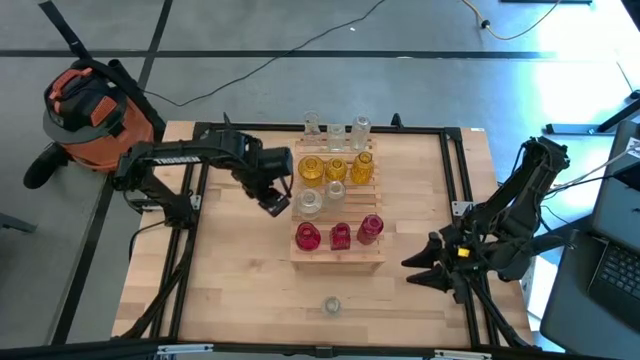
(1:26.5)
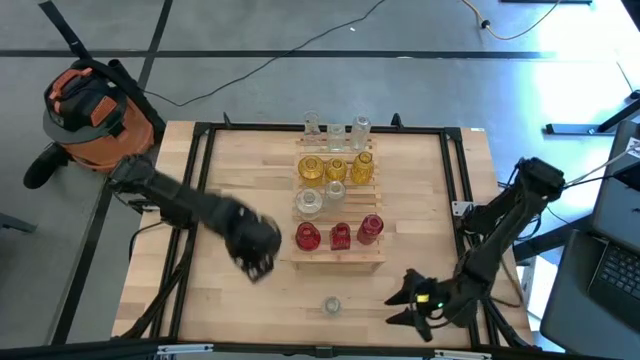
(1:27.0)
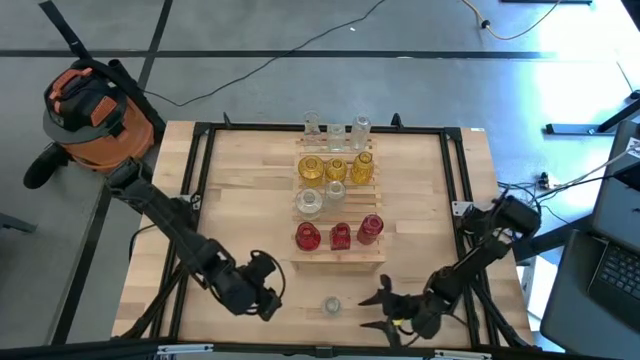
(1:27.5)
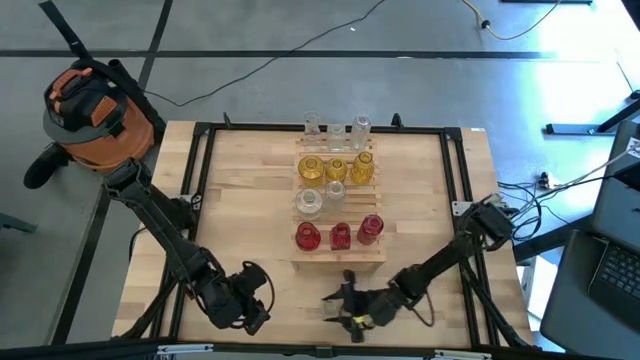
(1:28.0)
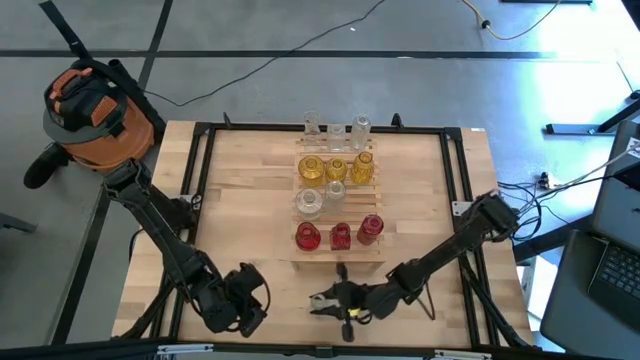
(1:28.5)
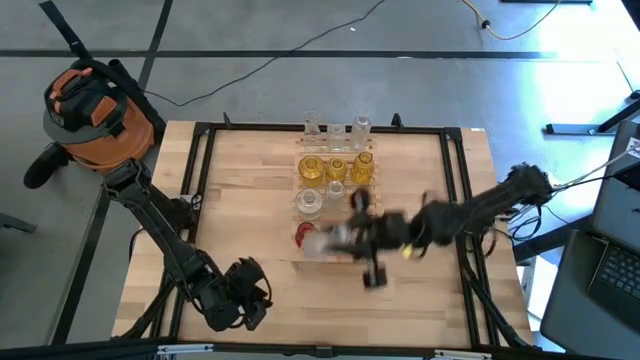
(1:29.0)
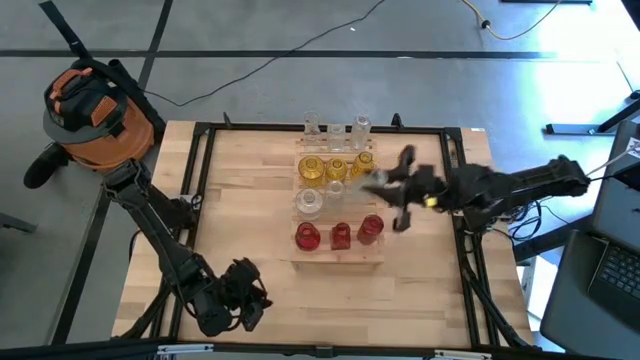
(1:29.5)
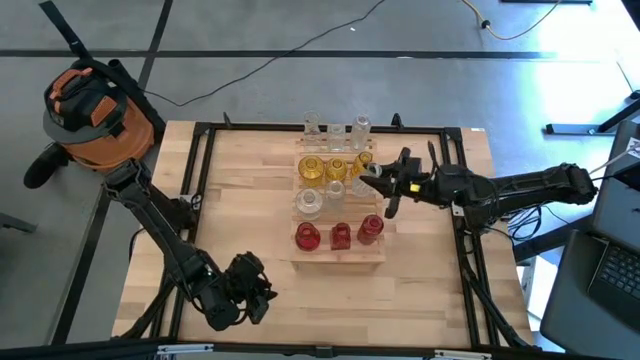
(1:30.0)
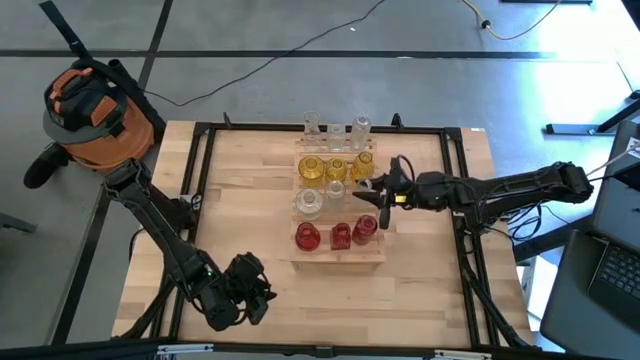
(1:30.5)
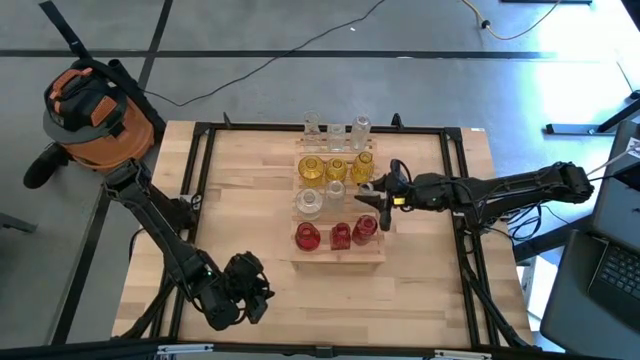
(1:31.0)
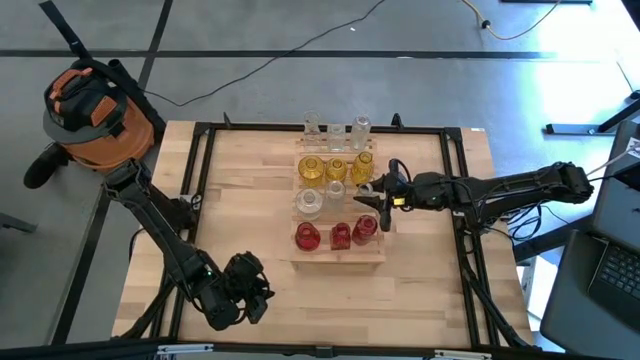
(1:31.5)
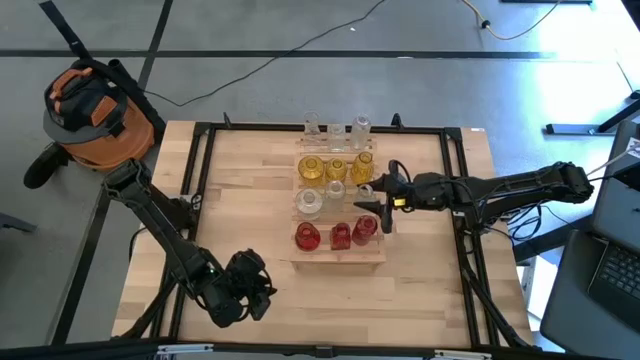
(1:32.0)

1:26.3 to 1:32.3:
Task: sort vases onto shelf
Align the transparent vase with the transparent vases on the shelf

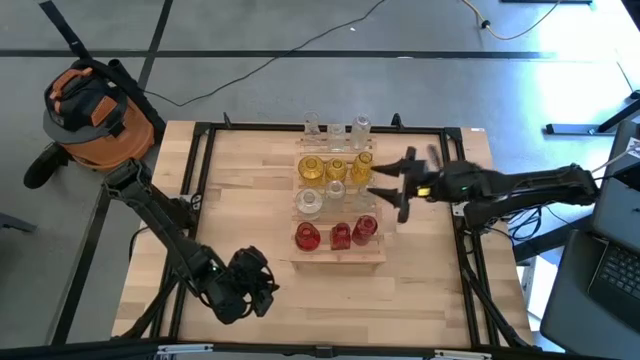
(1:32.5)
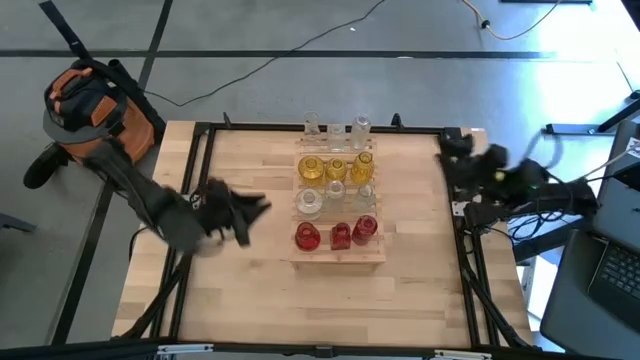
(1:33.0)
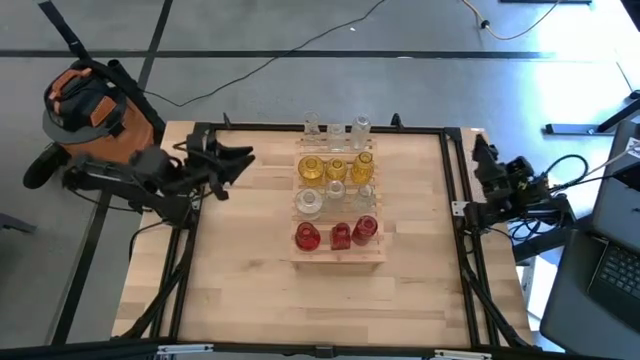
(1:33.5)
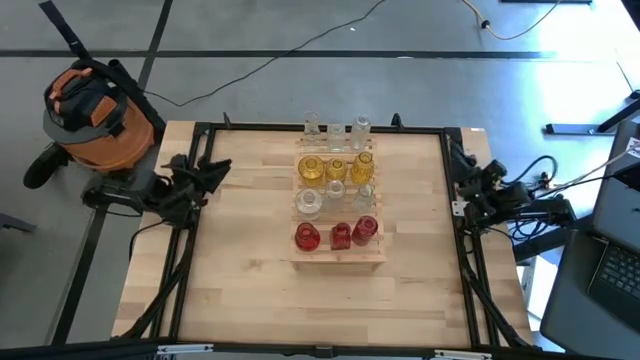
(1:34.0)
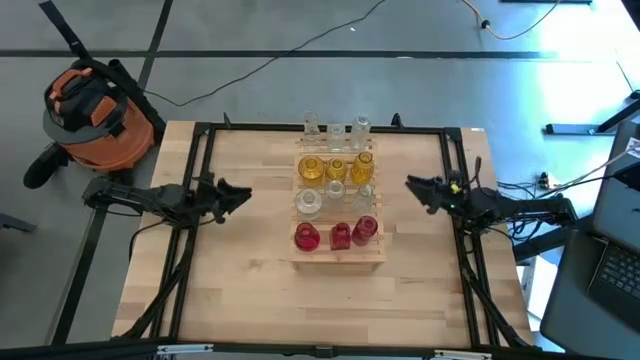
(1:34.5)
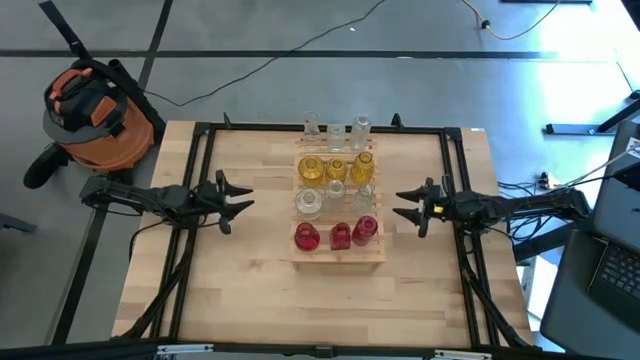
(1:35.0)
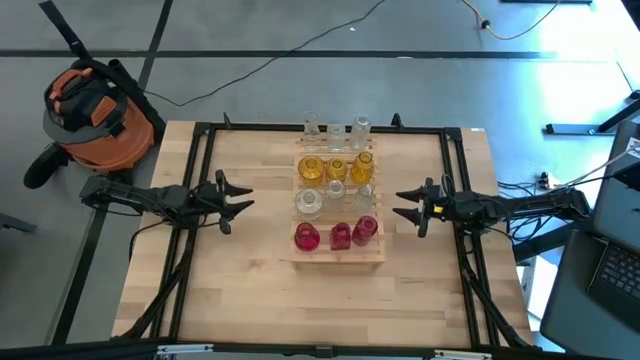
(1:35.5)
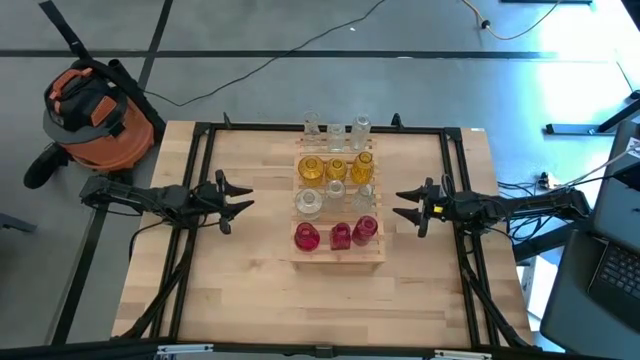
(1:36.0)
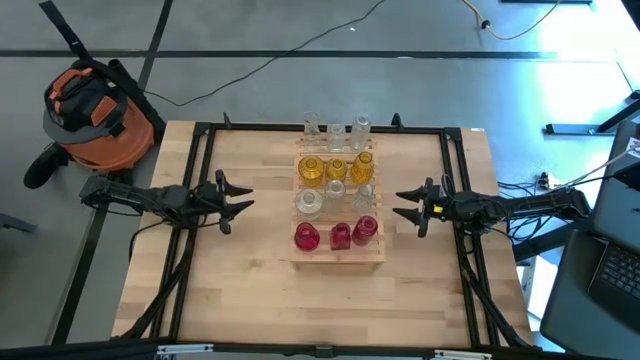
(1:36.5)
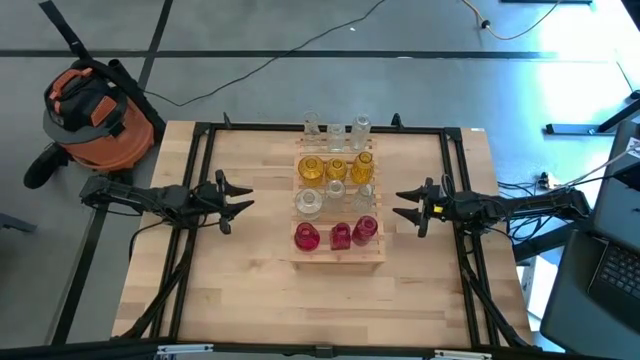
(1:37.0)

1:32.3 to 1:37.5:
Return to Home Position

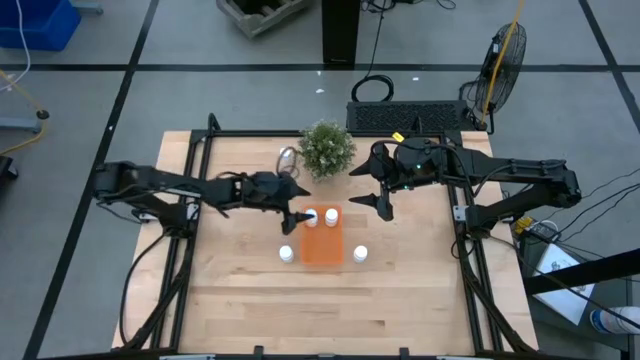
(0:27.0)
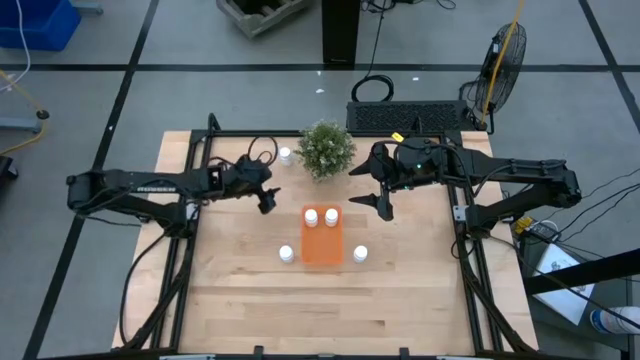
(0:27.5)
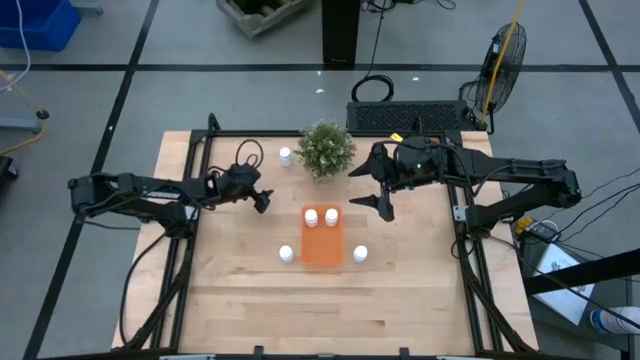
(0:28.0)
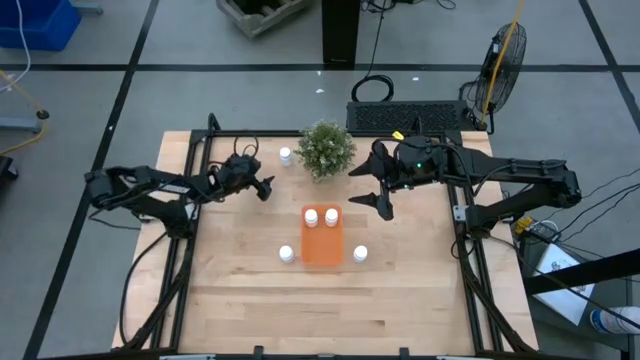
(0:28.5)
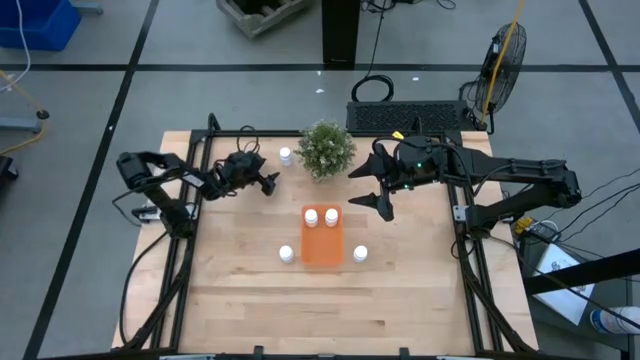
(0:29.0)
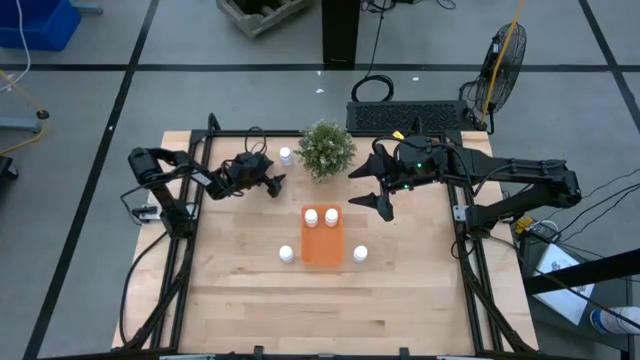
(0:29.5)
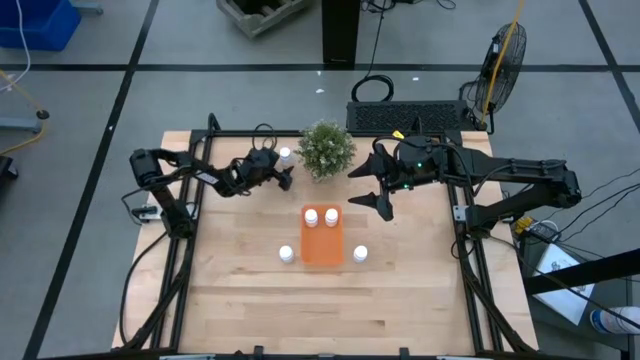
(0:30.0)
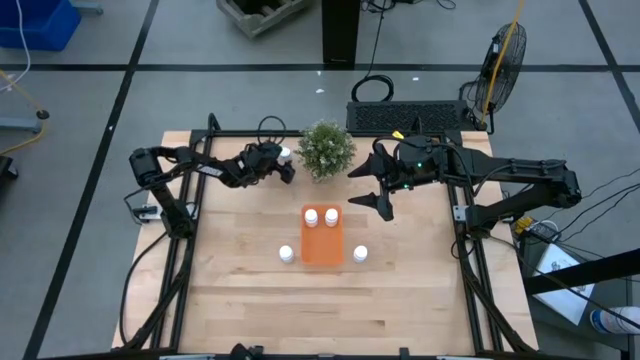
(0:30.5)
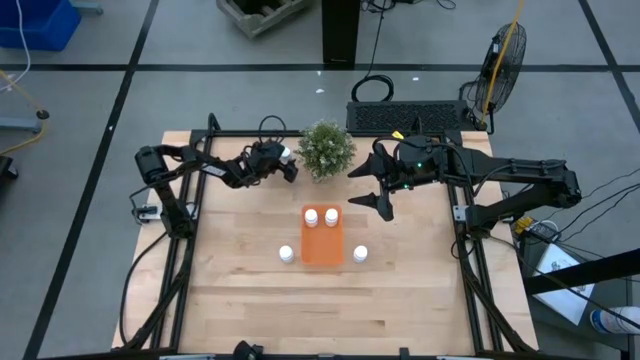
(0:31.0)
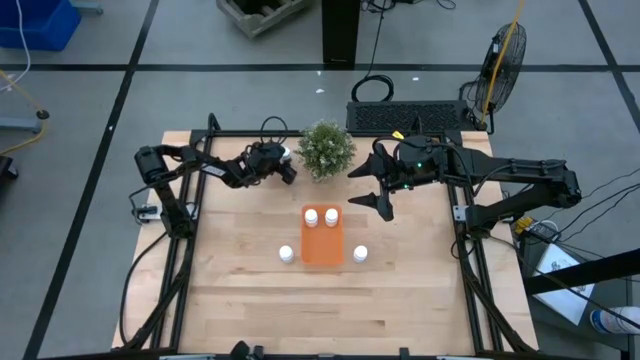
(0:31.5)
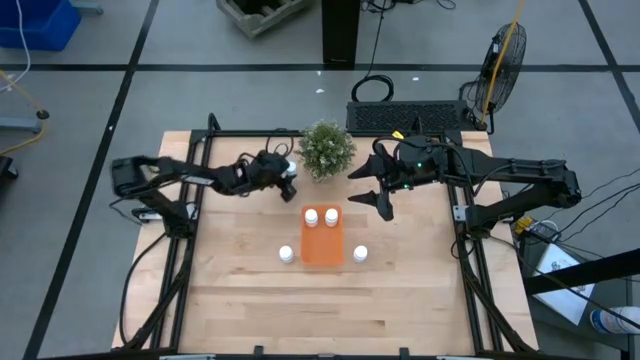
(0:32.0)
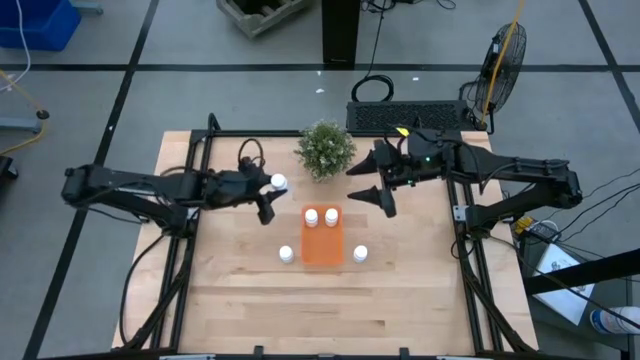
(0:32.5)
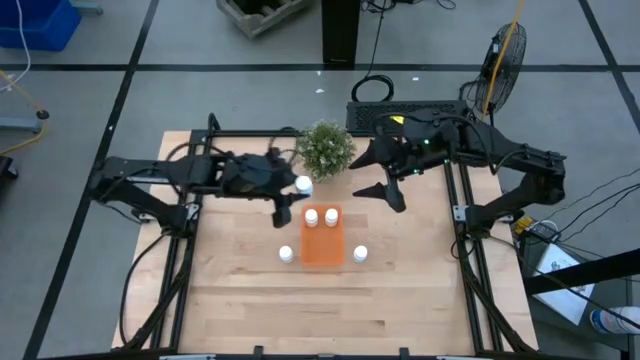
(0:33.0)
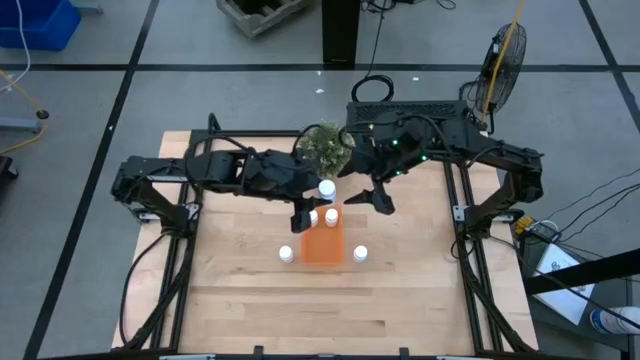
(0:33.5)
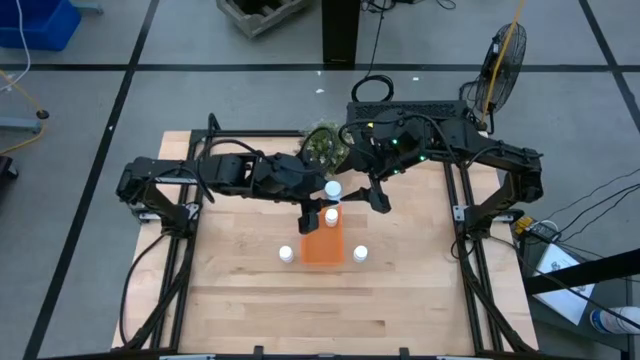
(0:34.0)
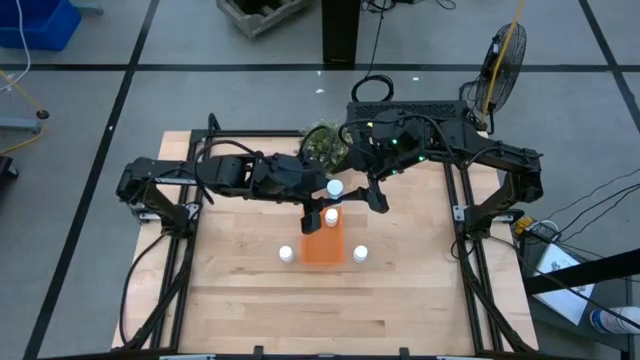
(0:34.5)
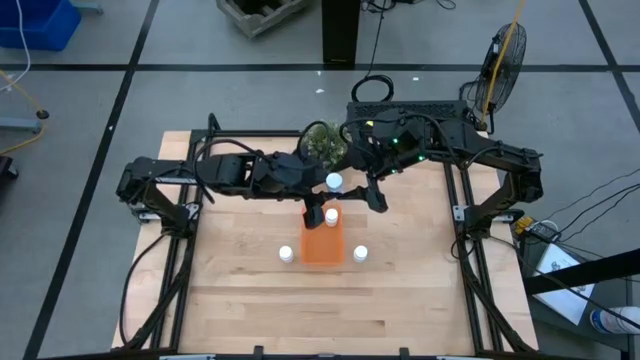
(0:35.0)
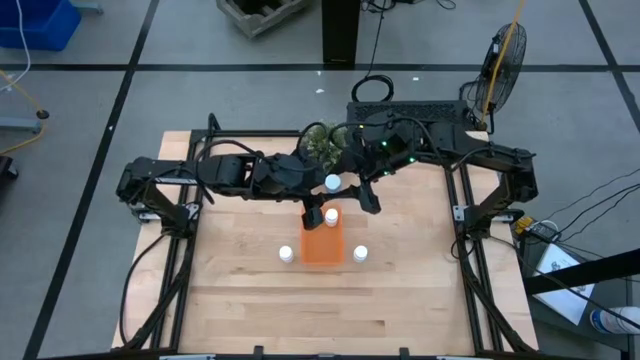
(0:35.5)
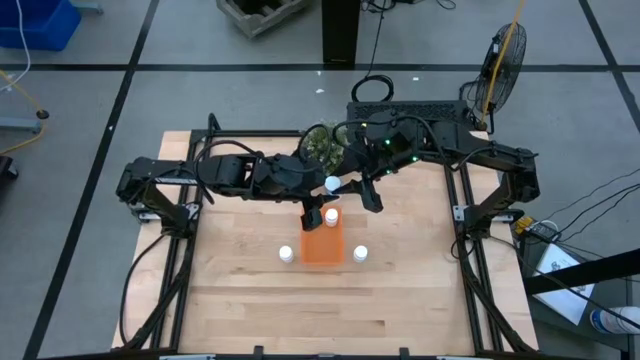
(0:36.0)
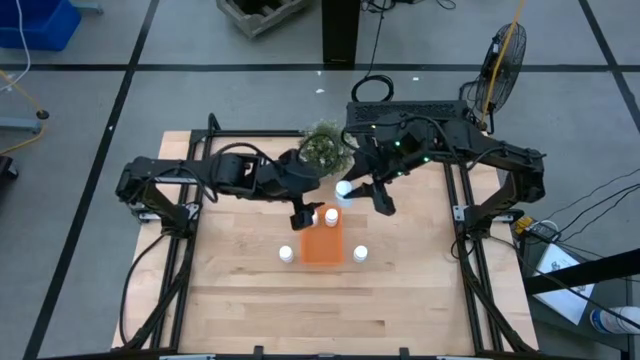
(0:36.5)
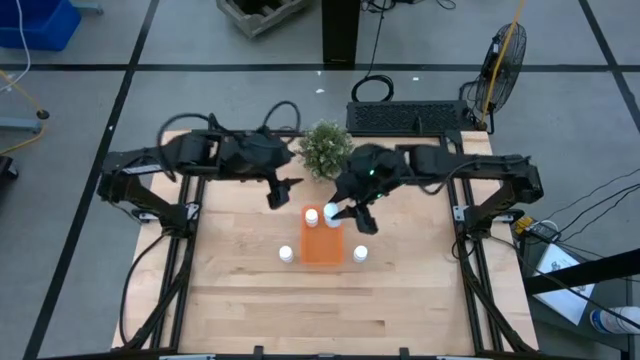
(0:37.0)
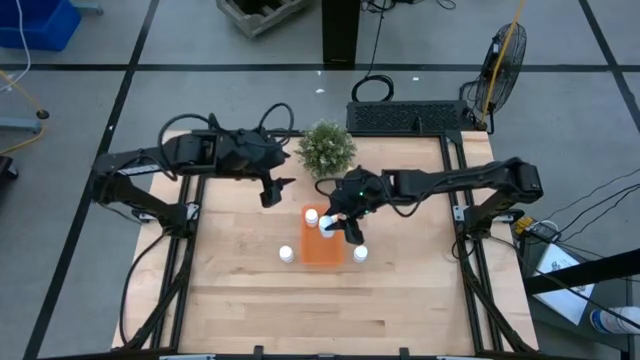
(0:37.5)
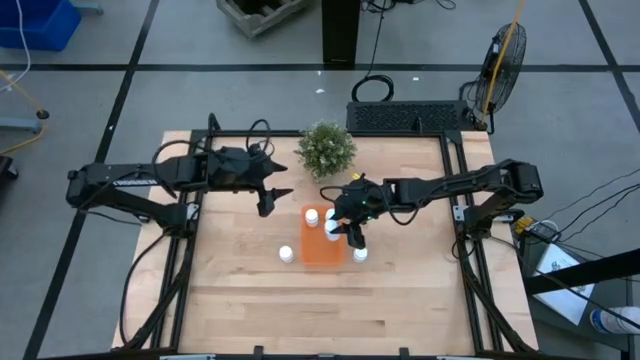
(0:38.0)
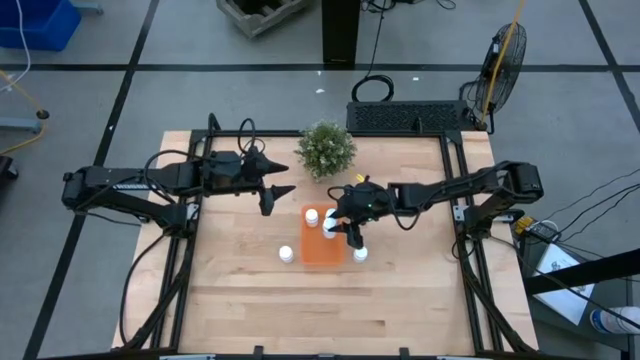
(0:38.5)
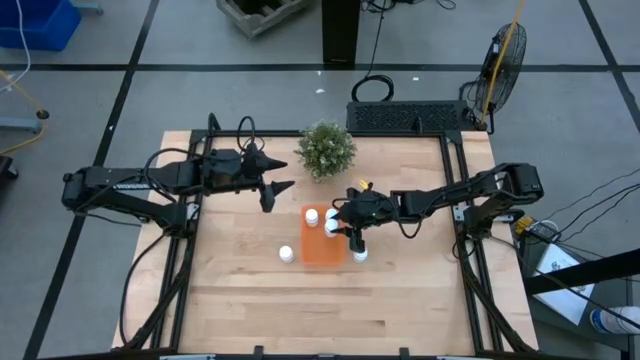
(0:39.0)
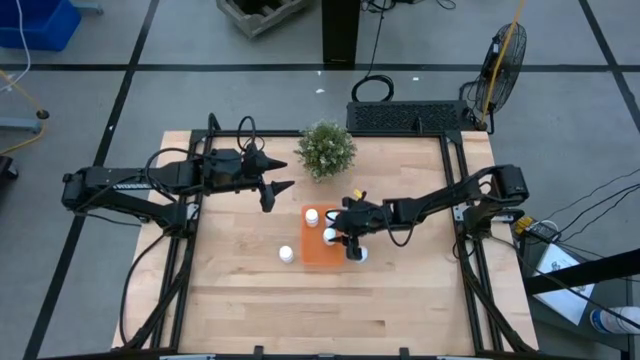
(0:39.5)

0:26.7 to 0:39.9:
Task: Pick and place pill bottles into a basket
Put the white medicine bottle into the orange bin
